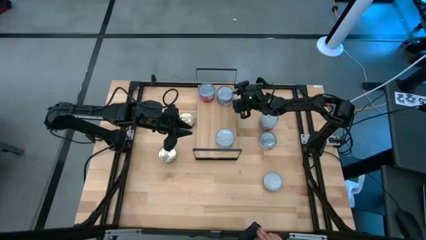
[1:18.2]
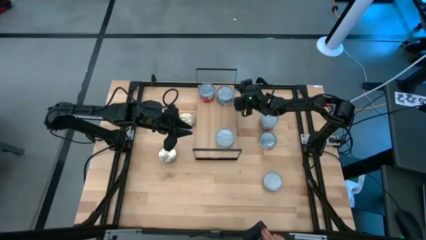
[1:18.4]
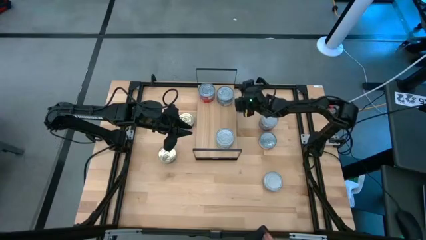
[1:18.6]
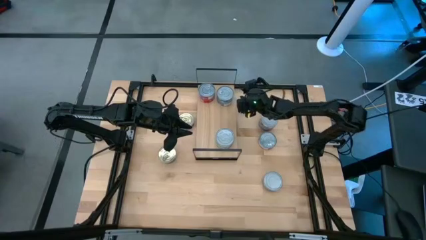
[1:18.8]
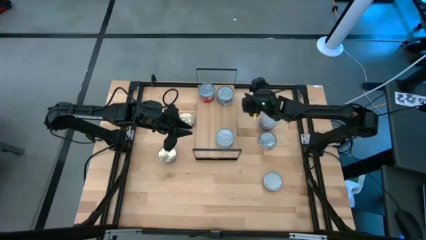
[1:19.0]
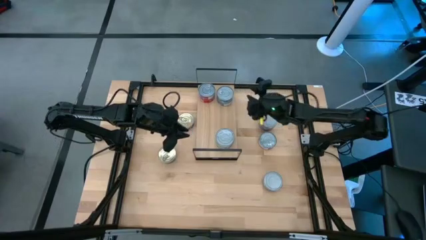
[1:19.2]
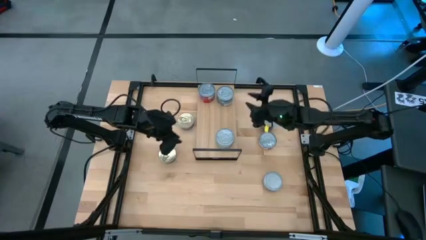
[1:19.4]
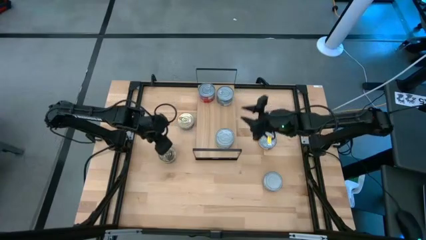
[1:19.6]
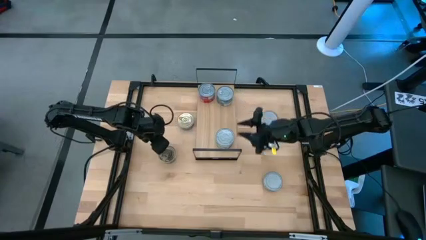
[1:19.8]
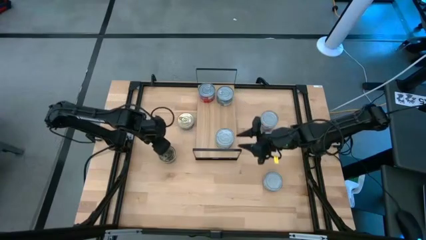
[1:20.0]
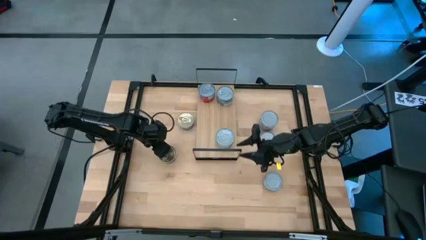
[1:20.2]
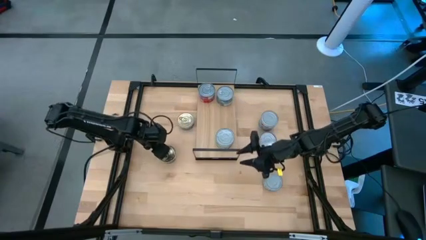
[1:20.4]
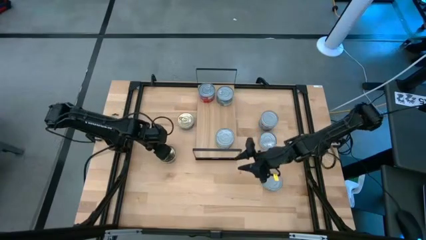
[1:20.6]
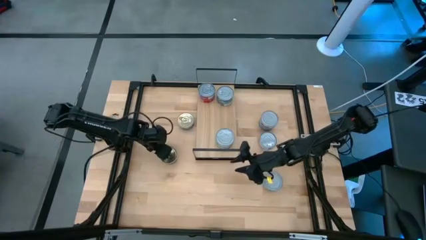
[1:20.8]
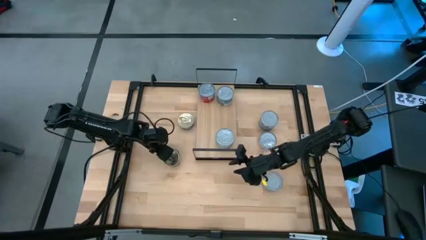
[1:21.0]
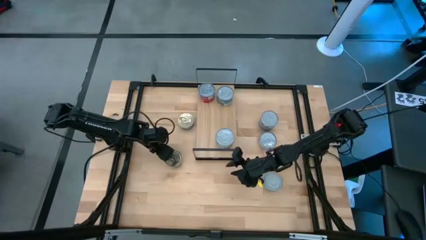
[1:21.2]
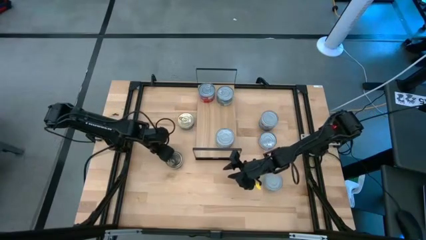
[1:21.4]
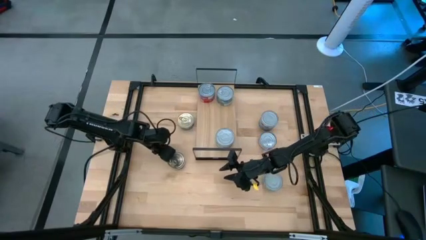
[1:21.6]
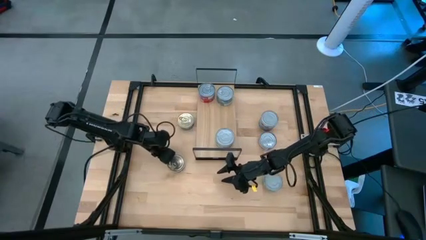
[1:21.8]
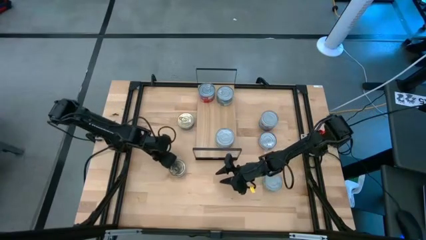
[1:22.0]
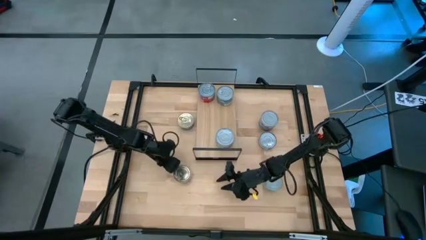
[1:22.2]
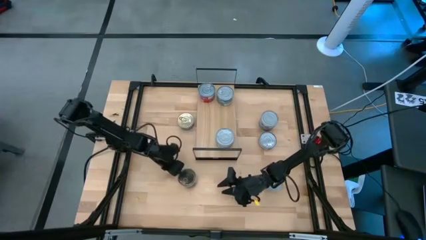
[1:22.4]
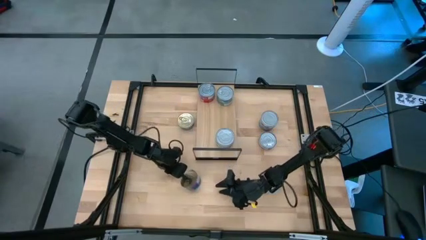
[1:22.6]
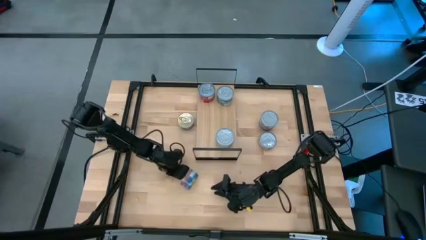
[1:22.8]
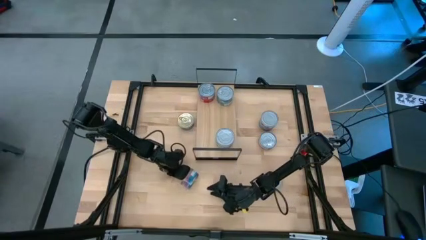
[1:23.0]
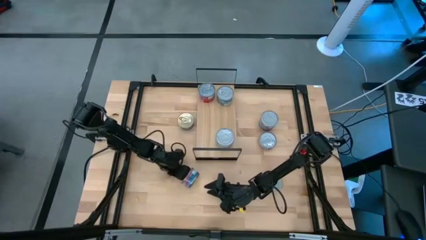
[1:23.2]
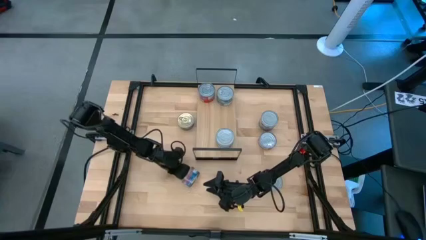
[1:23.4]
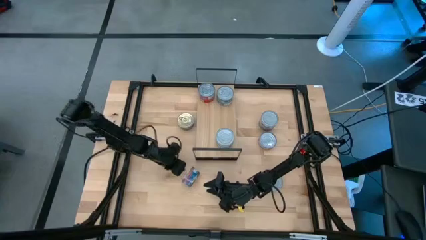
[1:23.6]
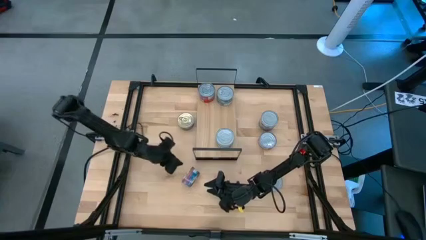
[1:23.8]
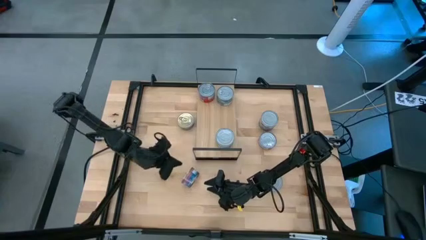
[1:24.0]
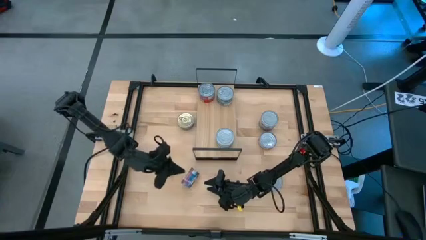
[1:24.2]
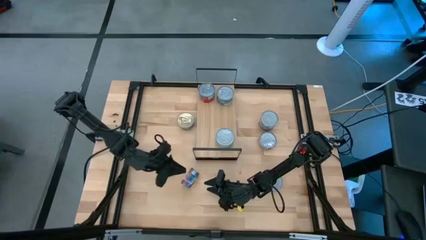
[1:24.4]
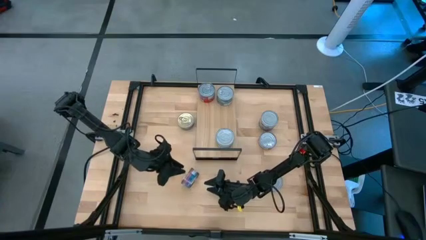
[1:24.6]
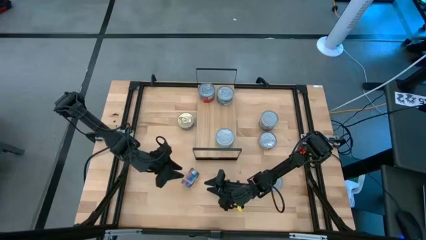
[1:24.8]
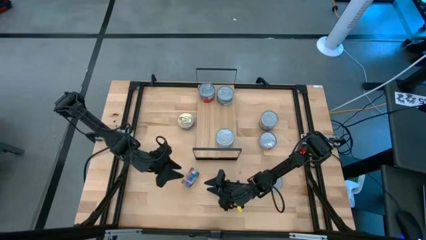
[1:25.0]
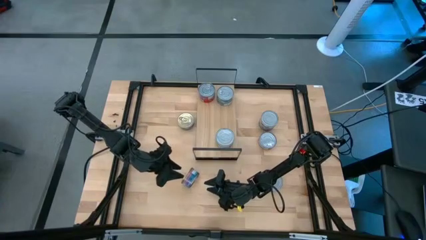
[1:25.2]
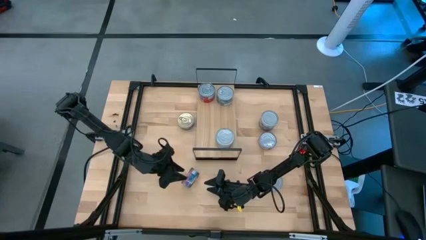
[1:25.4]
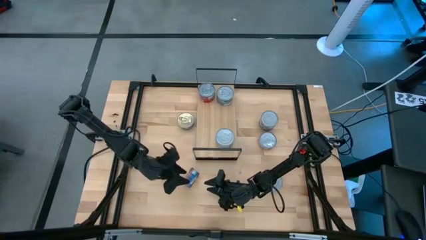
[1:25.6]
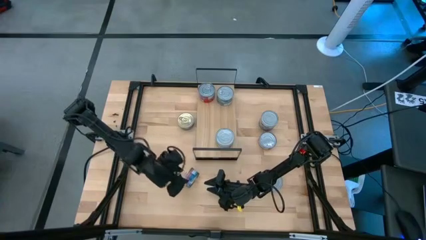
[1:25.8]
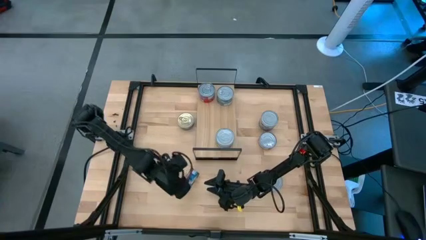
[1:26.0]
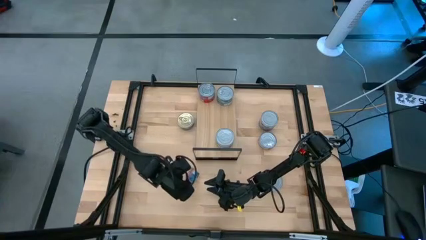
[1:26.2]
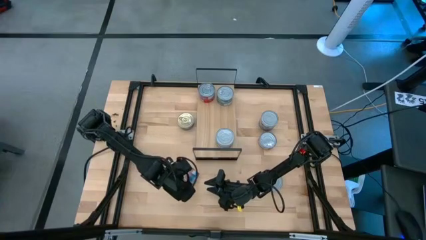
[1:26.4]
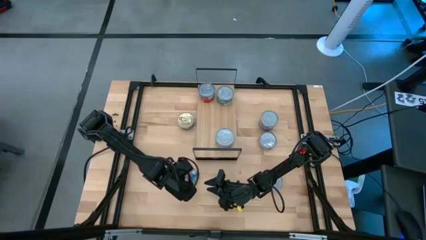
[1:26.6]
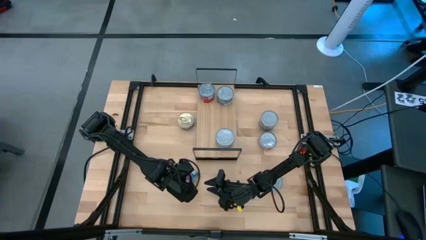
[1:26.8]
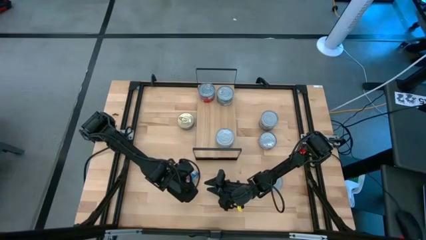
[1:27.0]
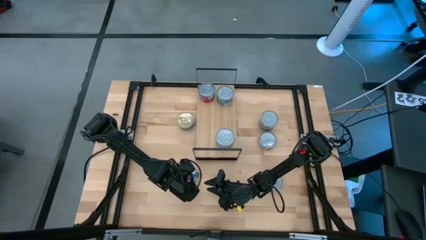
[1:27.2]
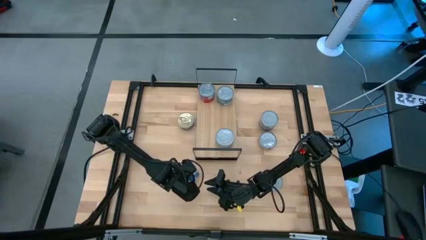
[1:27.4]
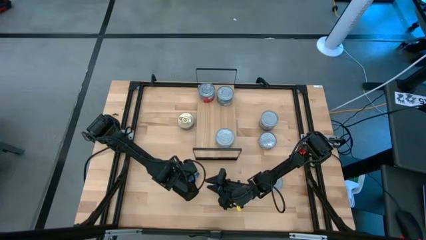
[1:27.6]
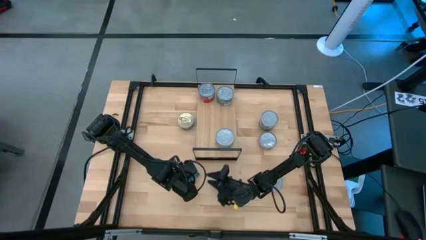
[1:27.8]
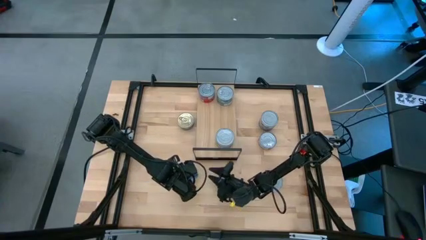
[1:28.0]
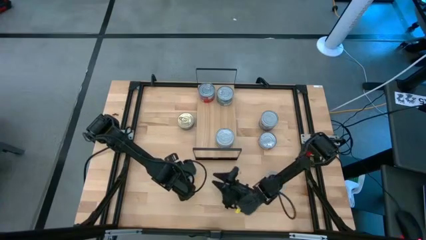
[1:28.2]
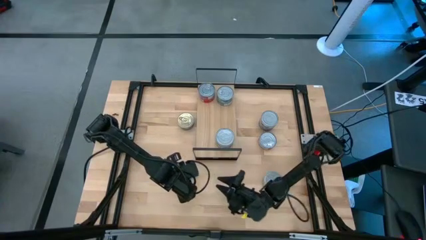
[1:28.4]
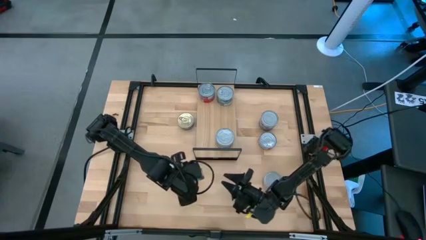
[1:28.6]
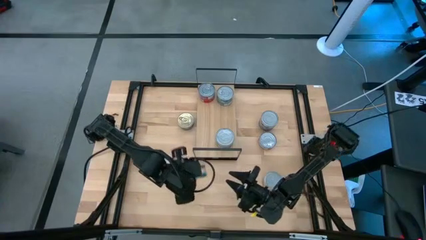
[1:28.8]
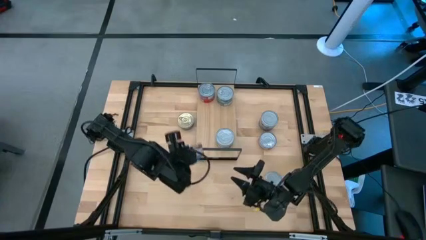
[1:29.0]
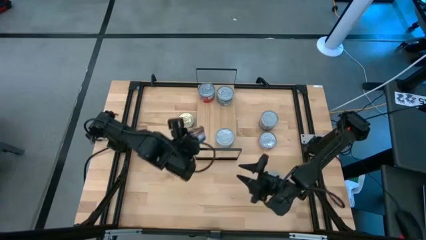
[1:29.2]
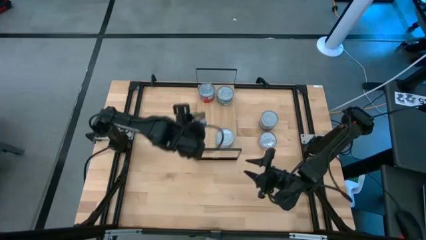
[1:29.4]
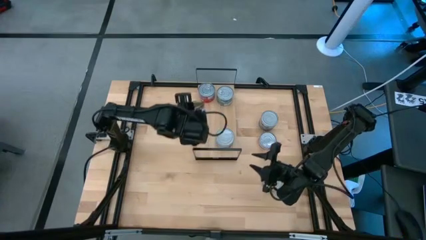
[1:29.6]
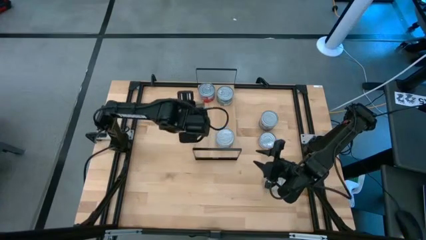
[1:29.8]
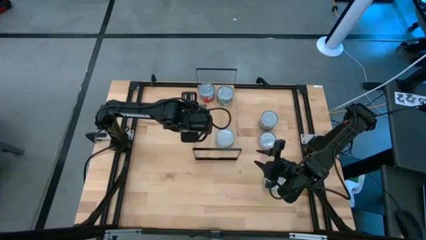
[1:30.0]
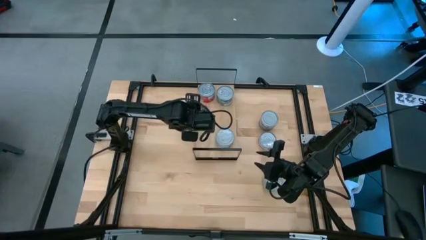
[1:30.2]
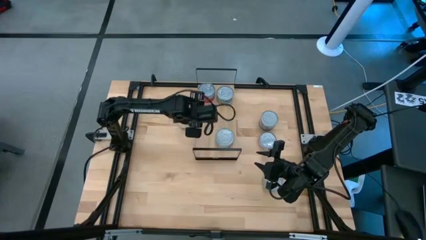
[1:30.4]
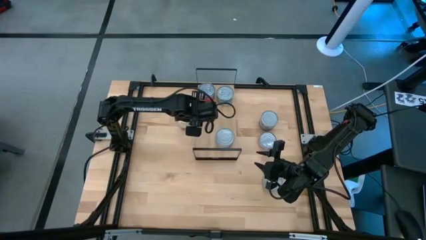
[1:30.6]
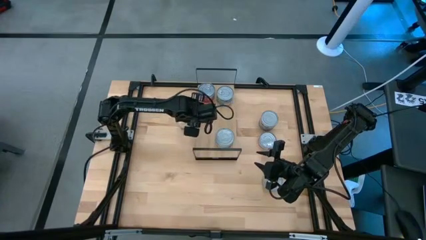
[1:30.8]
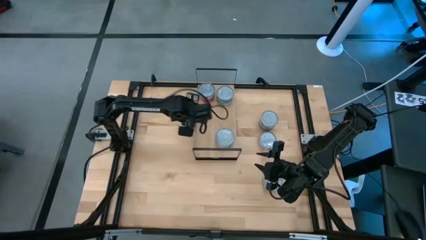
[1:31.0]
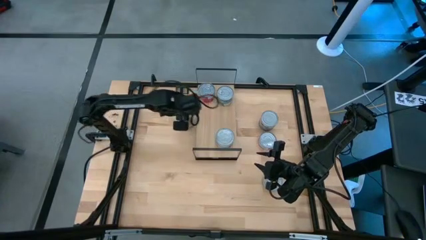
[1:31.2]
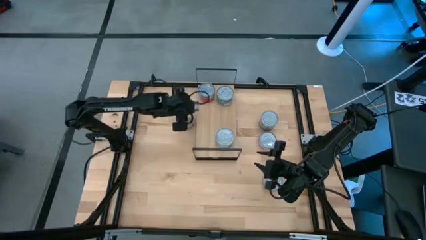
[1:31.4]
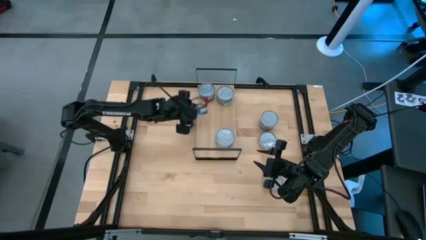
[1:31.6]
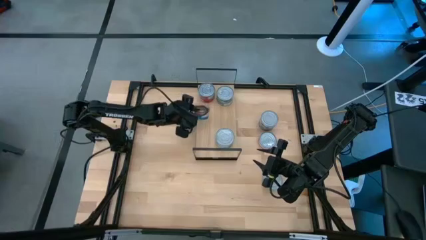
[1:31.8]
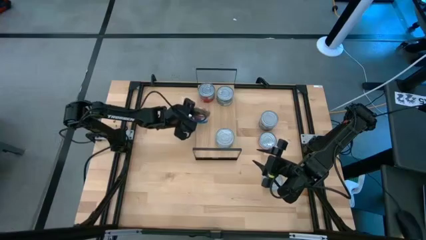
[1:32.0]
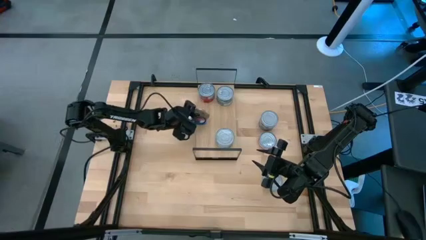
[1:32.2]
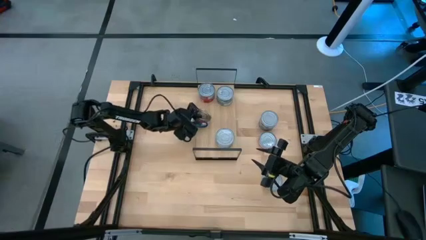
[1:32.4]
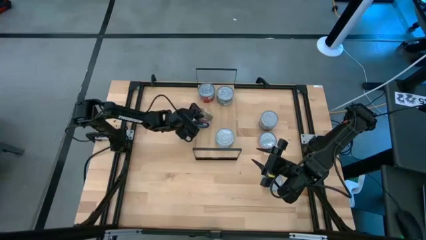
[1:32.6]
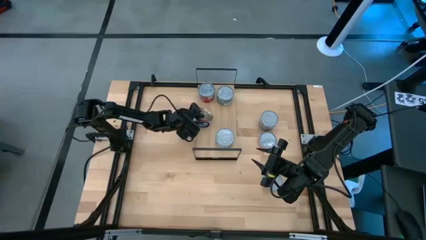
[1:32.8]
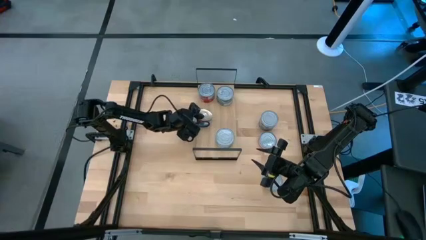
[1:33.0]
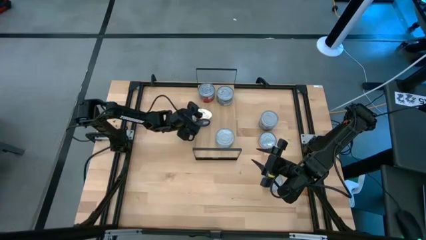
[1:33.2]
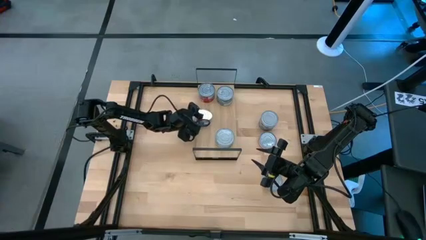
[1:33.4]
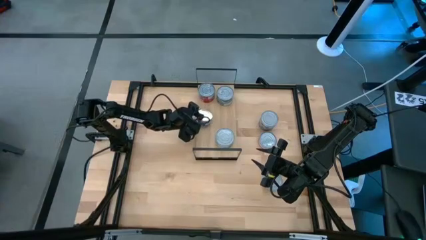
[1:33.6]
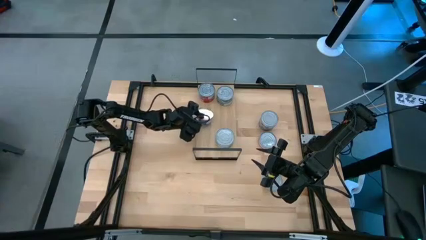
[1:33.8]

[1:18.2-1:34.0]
Task: Stack canned seafood by type on shelf
Put the blue-pink tuna can on the shelf
